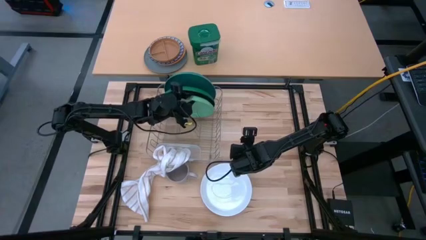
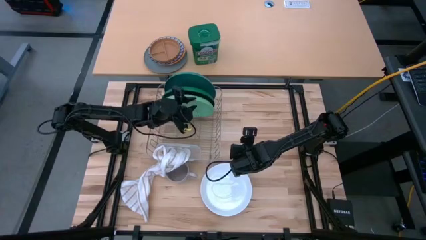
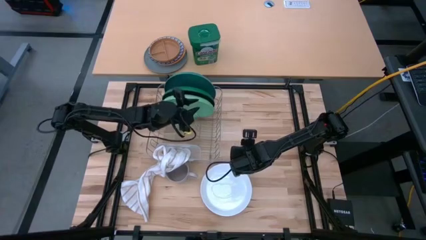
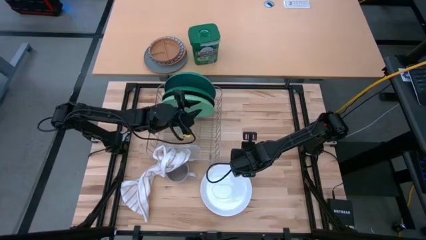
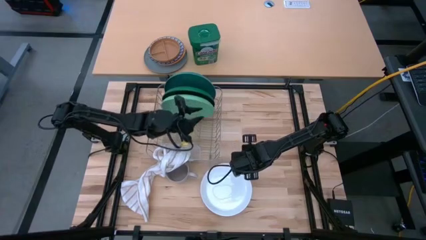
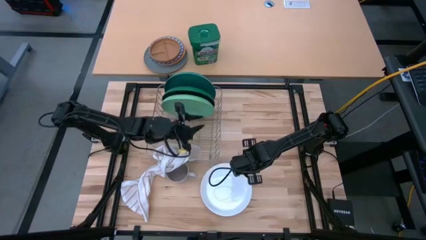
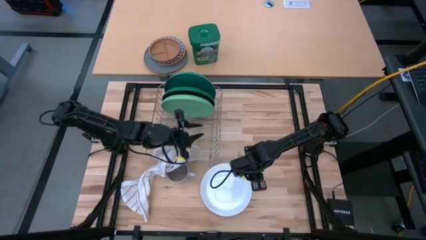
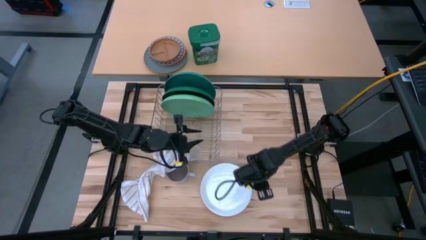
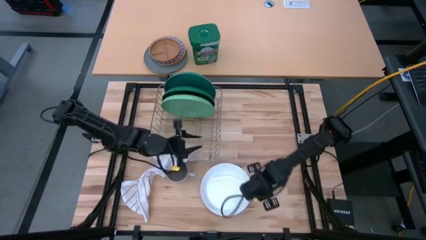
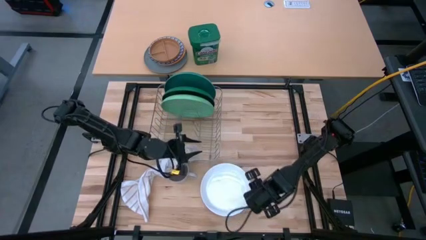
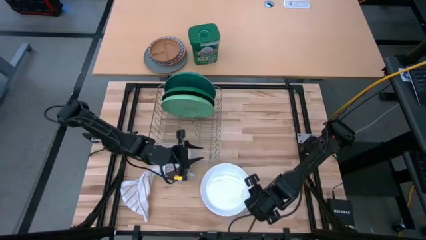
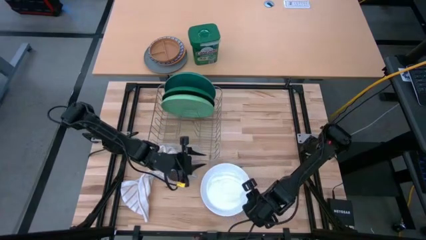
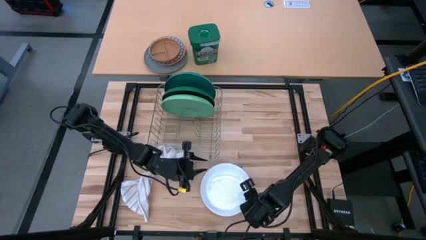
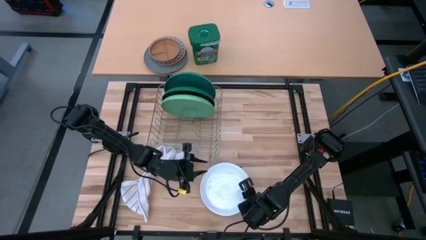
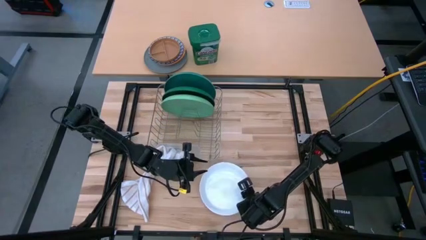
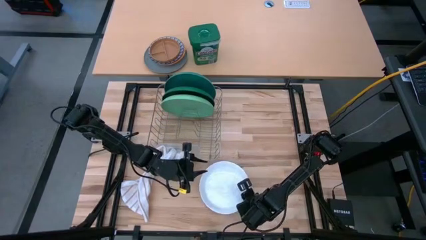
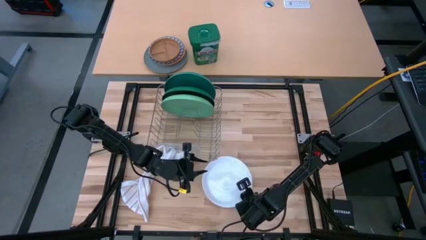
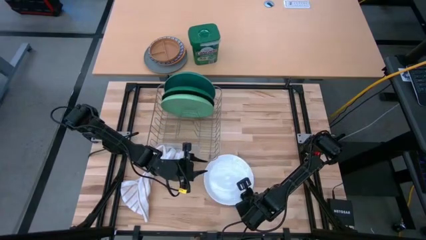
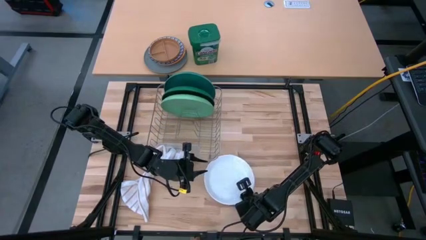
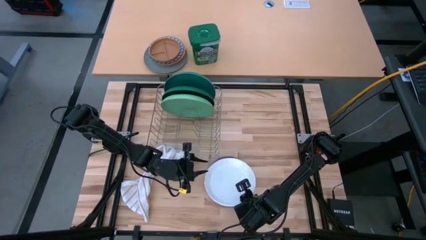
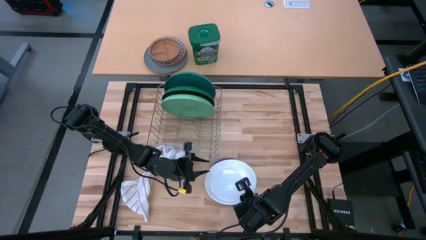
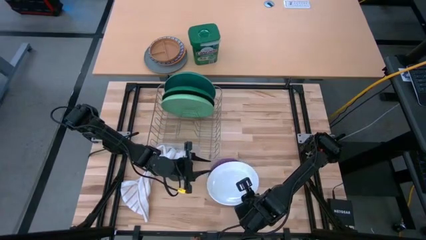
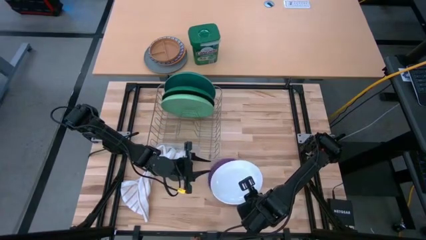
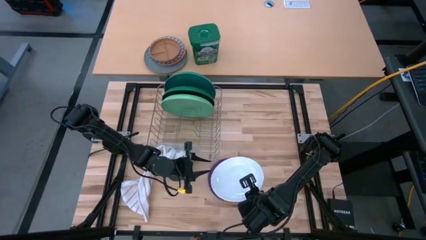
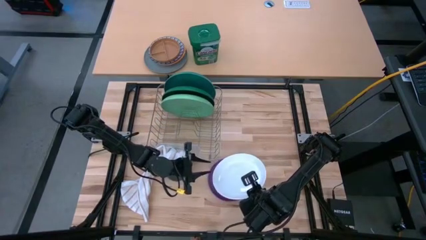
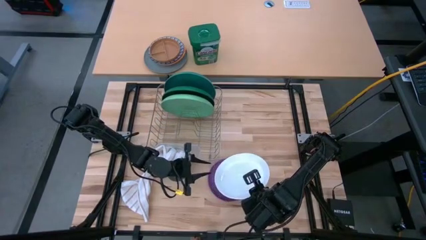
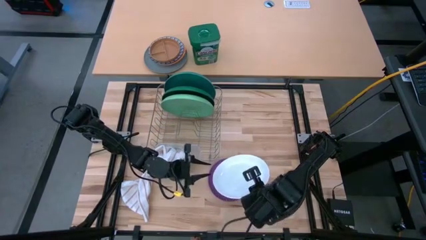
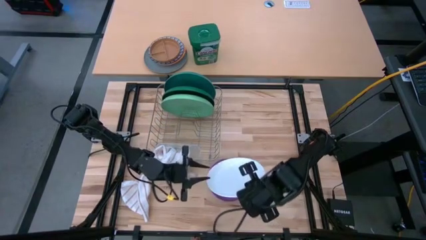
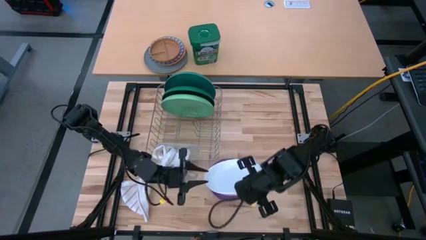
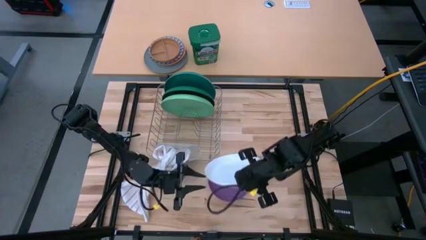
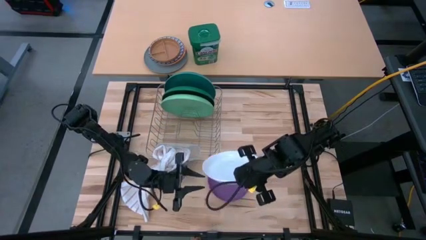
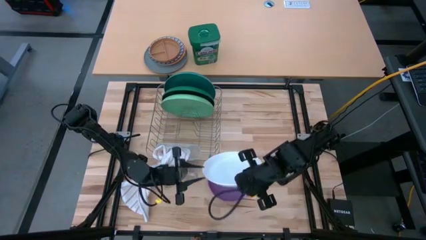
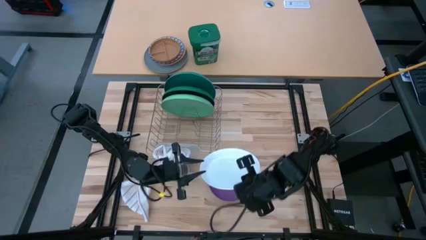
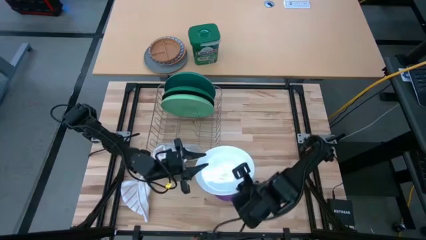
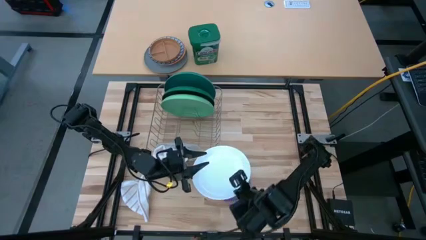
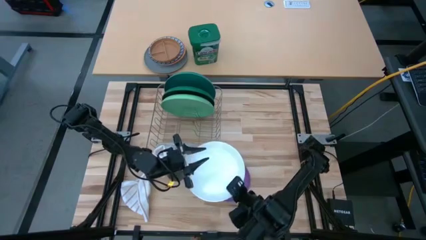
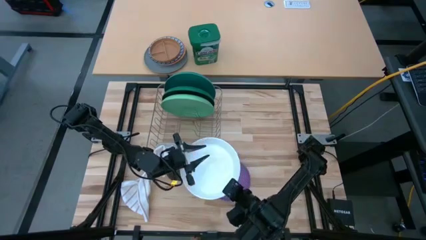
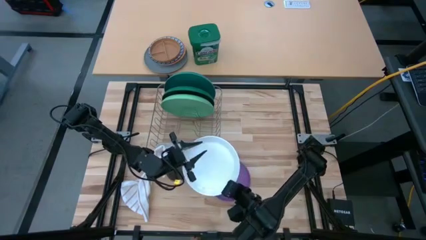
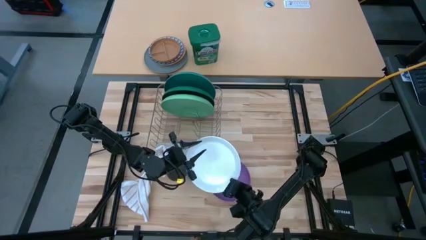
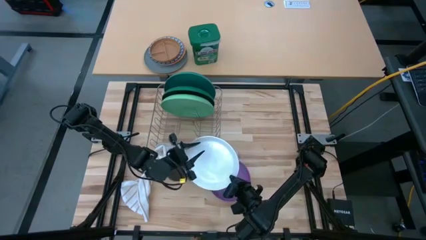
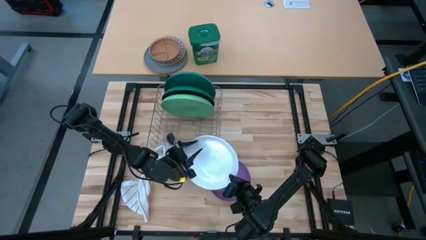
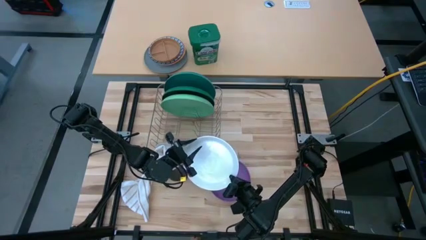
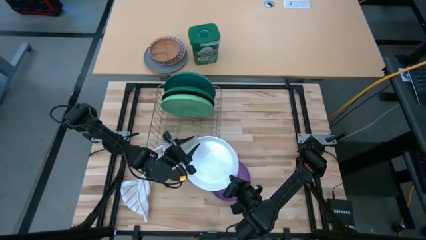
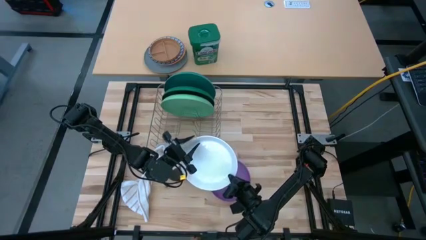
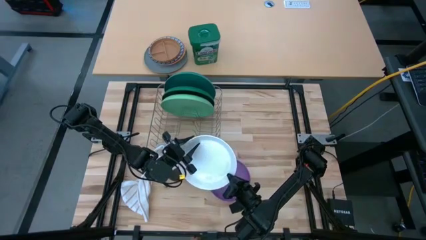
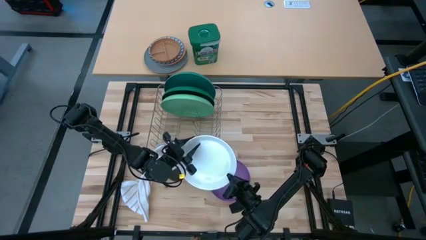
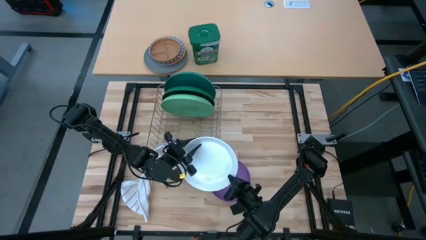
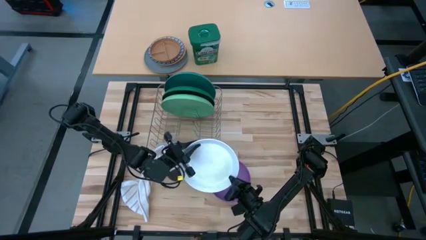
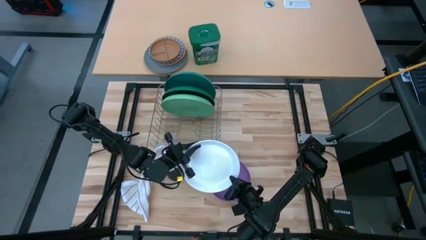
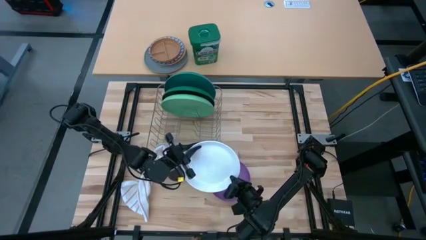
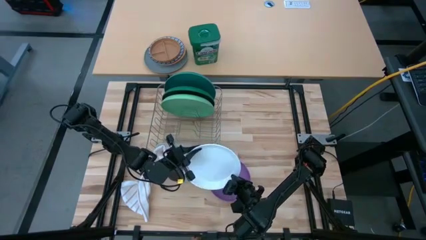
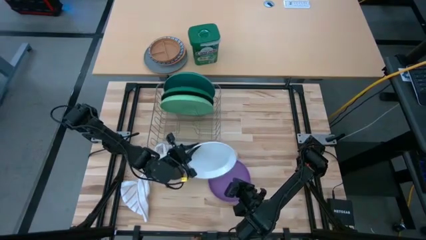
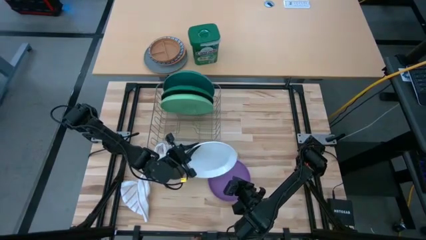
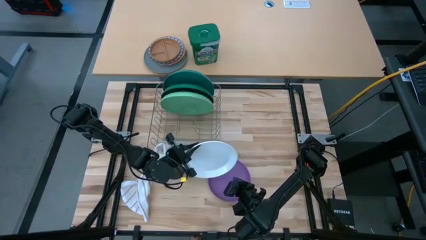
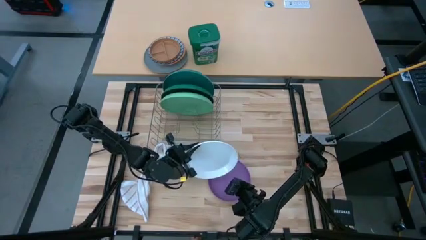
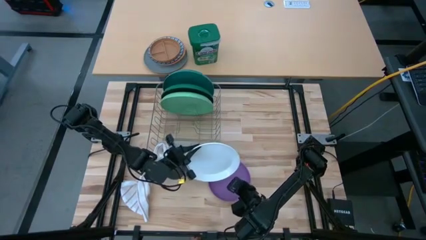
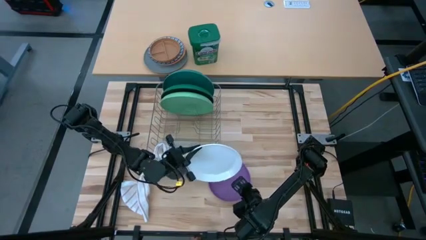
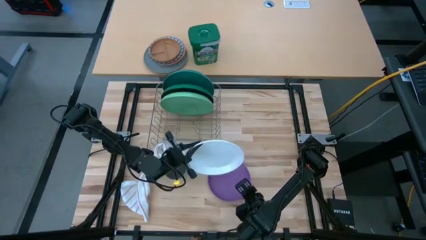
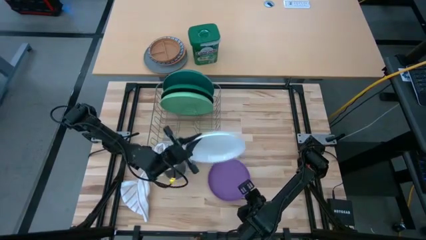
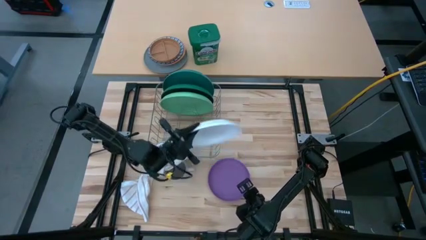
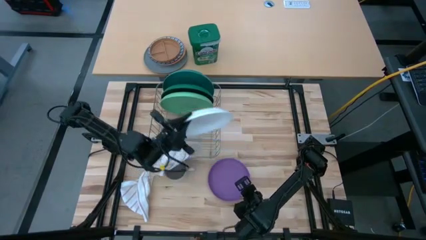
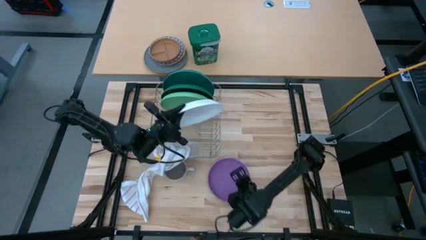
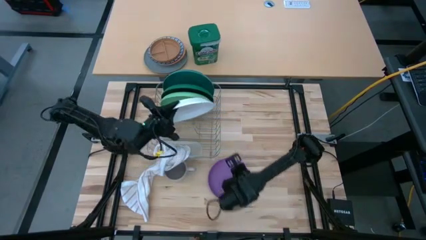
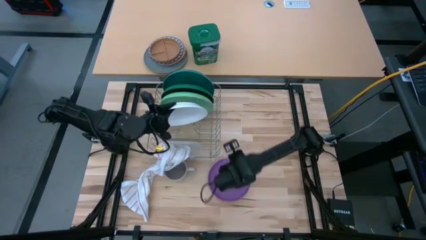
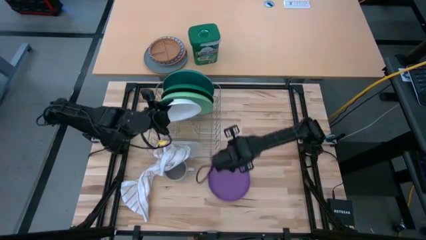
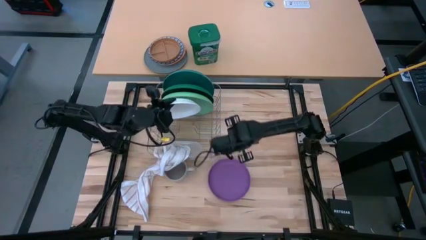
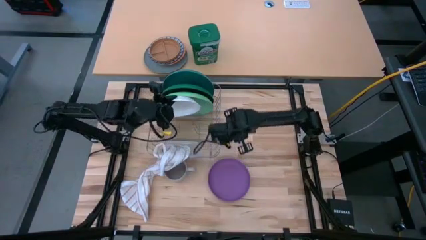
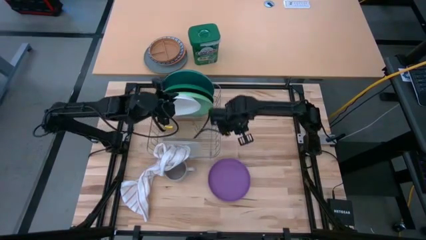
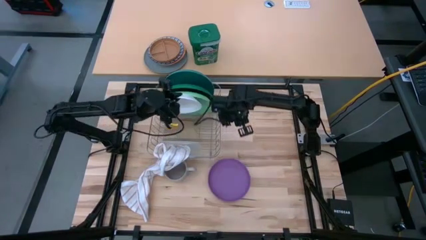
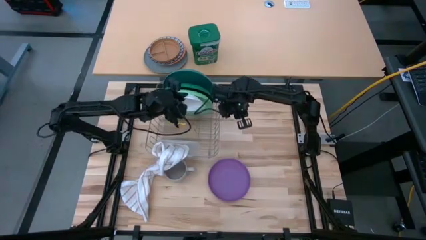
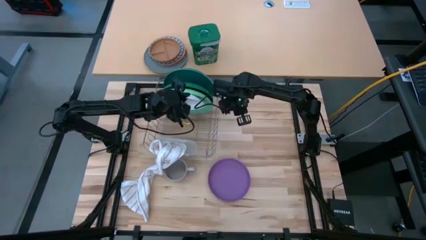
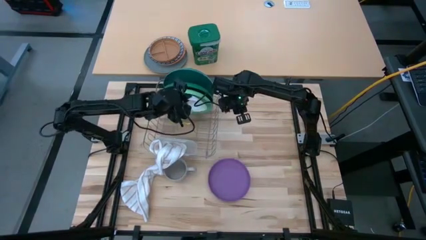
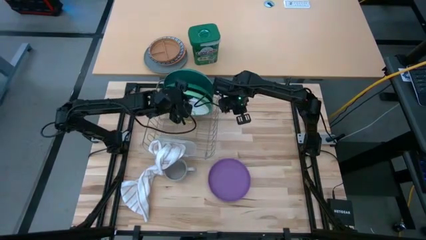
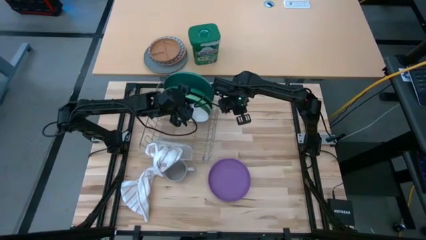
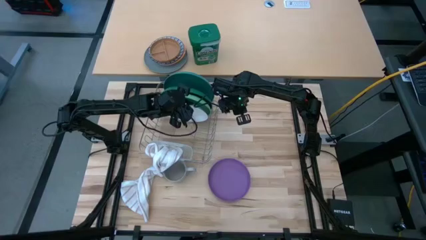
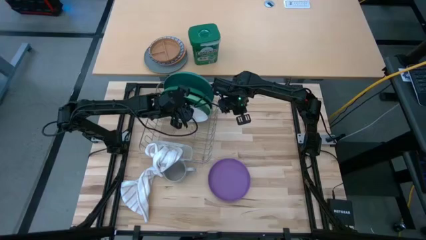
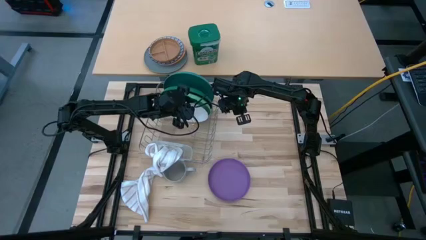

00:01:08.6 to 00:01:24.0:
Task: Sort dishes
Put the white plate into the gray dish rack

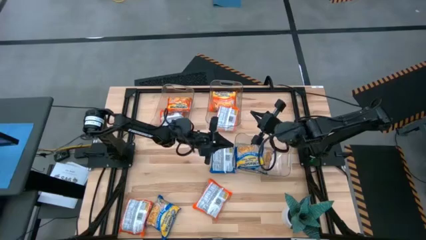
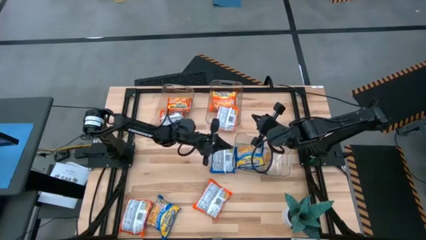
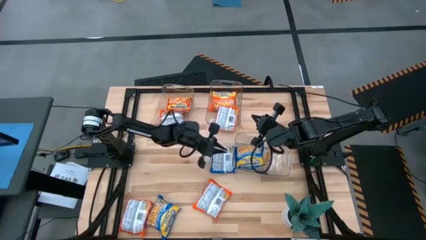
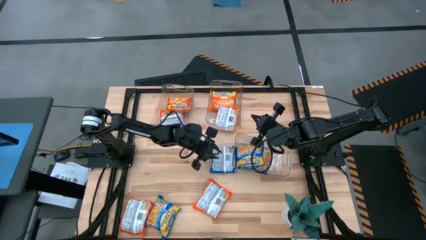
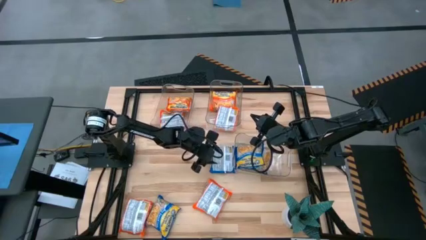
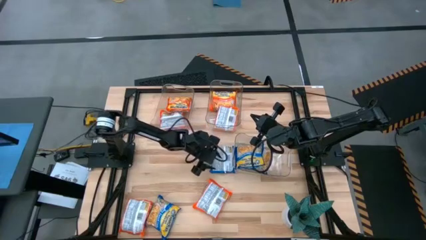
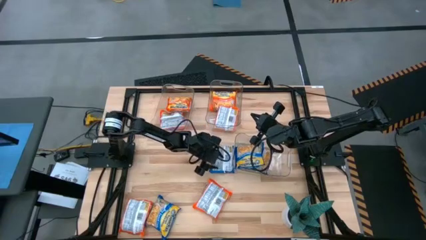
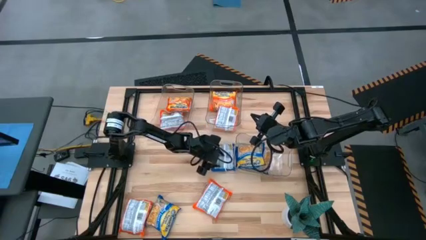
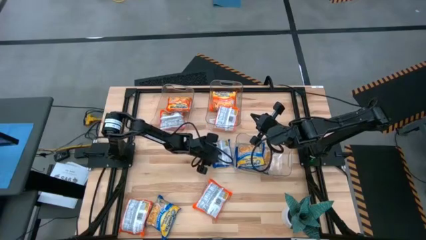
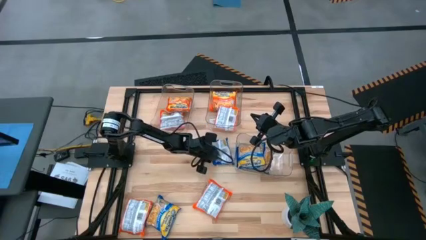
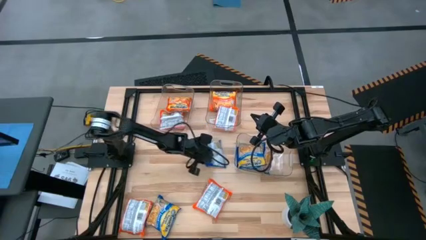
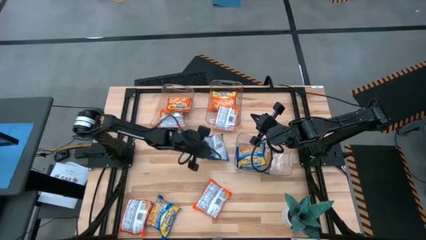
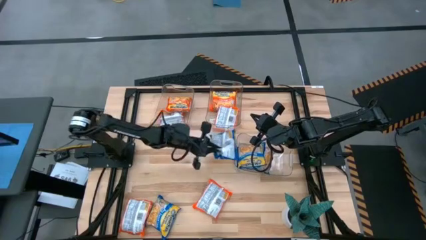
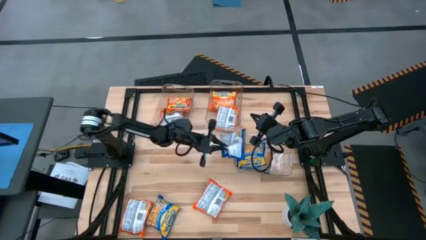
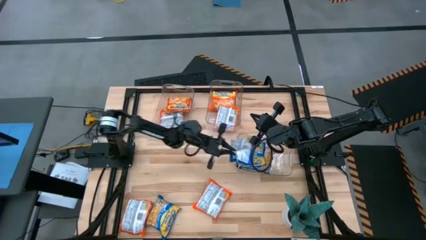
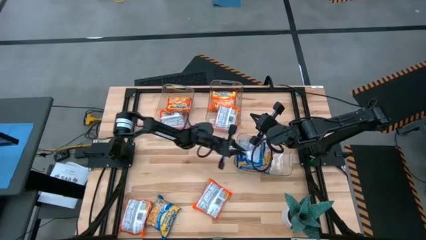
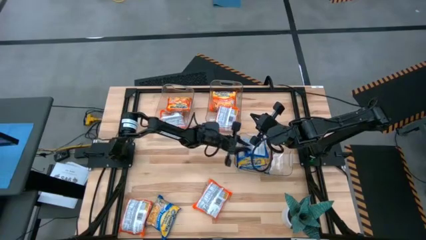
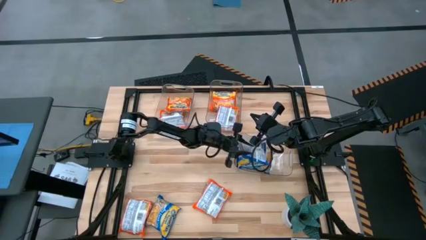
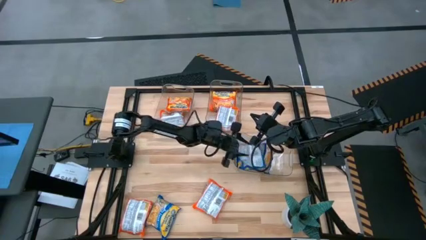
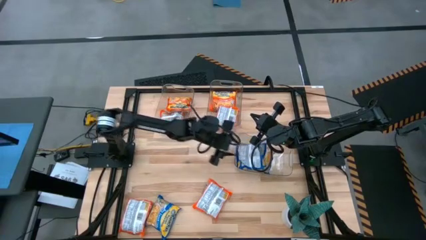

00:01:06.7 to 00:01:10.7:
Task: Sort Maruchan noodles
Put the blue bag into the right transparent bin
